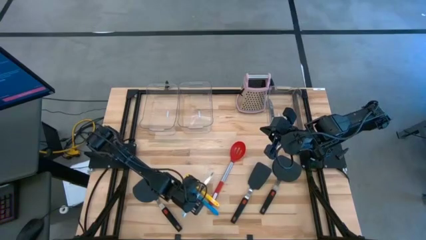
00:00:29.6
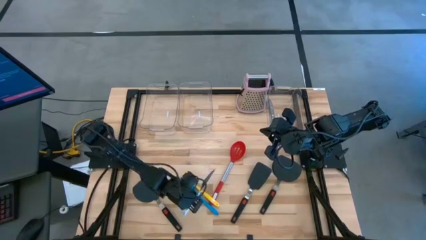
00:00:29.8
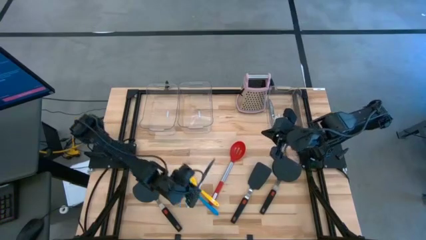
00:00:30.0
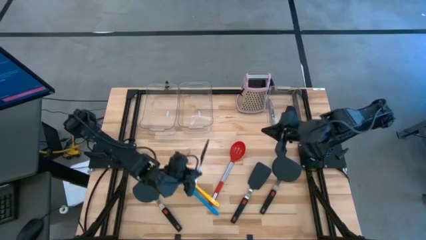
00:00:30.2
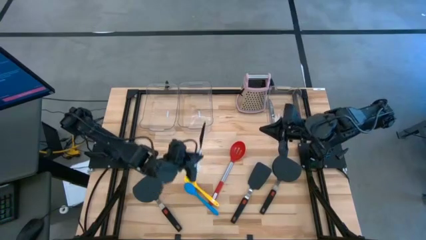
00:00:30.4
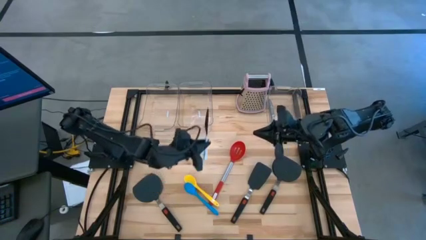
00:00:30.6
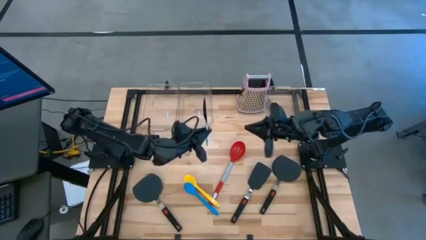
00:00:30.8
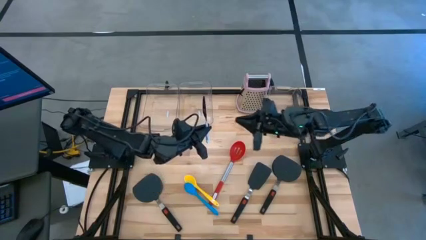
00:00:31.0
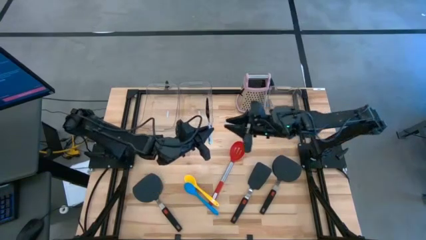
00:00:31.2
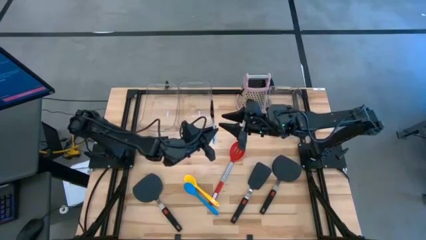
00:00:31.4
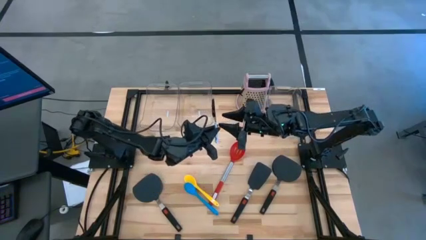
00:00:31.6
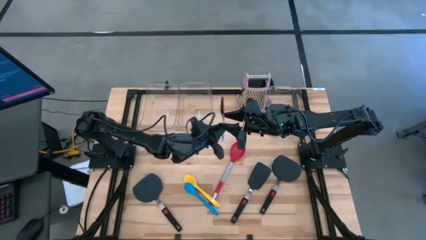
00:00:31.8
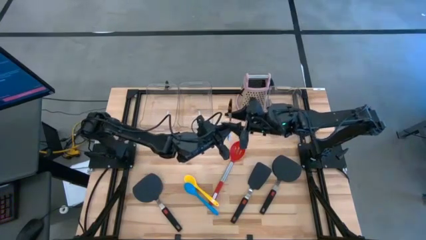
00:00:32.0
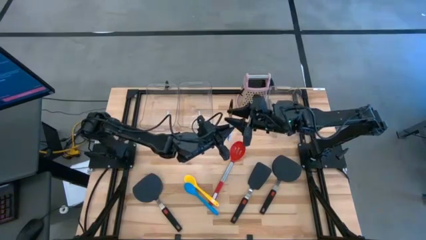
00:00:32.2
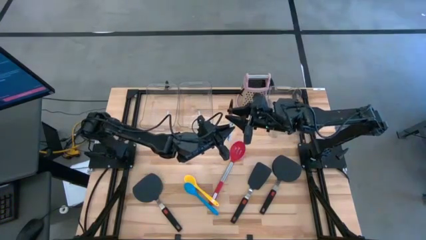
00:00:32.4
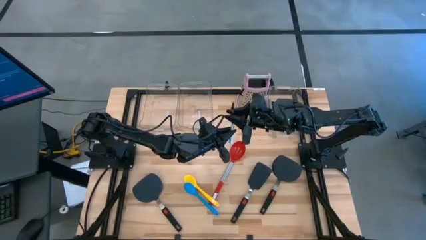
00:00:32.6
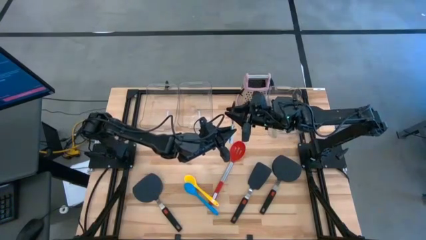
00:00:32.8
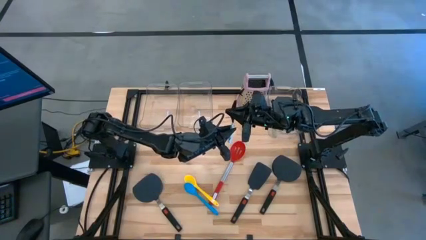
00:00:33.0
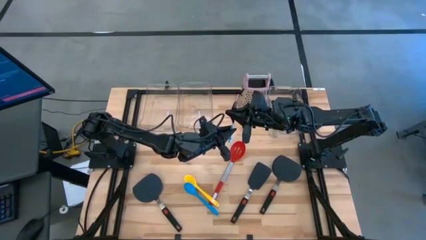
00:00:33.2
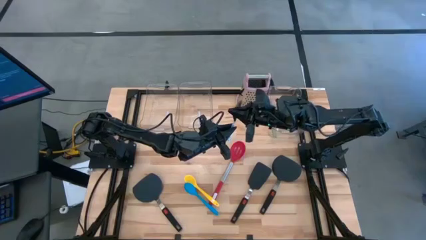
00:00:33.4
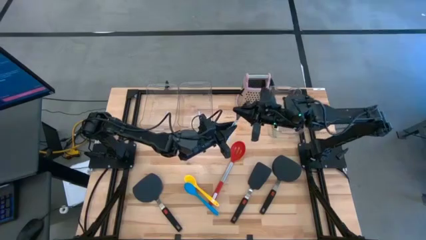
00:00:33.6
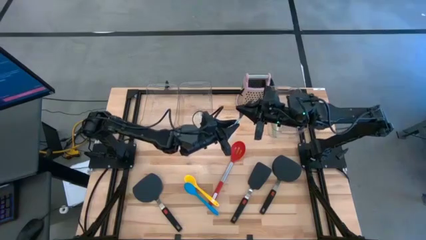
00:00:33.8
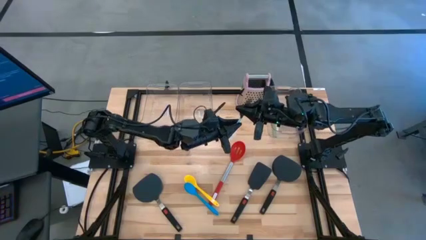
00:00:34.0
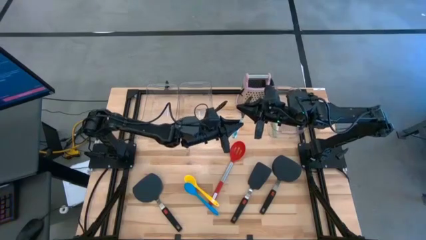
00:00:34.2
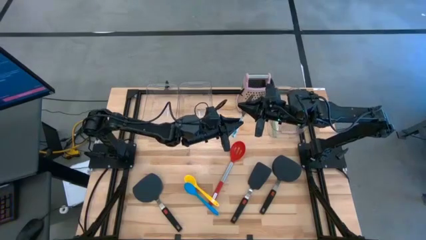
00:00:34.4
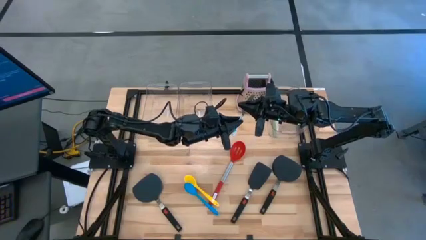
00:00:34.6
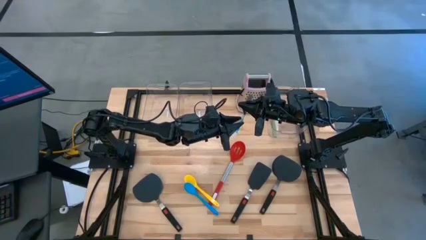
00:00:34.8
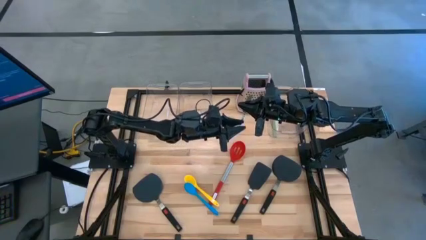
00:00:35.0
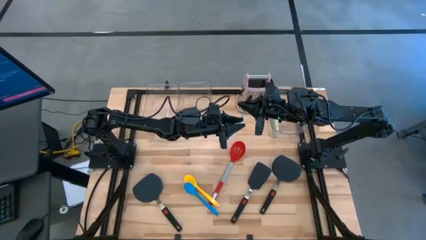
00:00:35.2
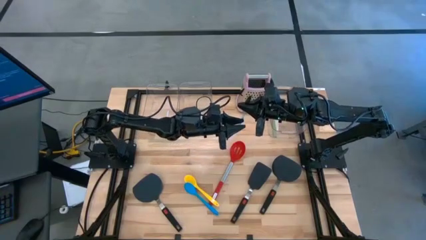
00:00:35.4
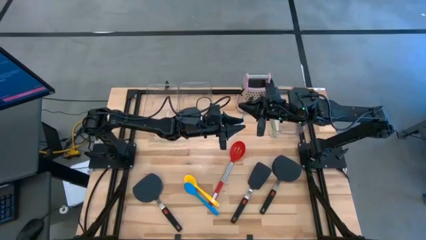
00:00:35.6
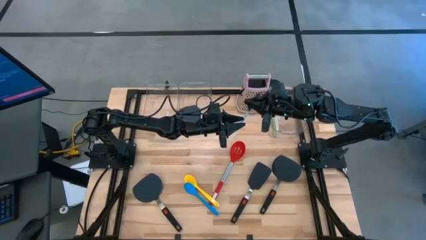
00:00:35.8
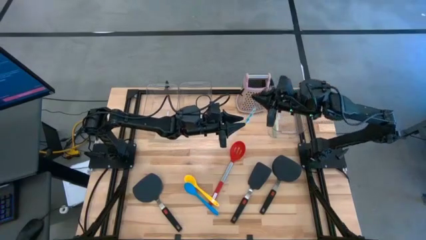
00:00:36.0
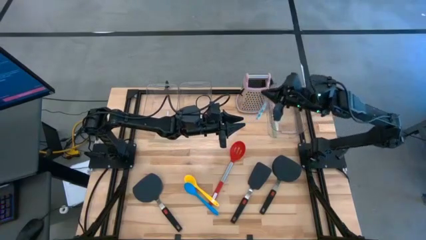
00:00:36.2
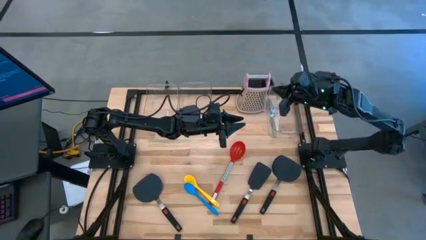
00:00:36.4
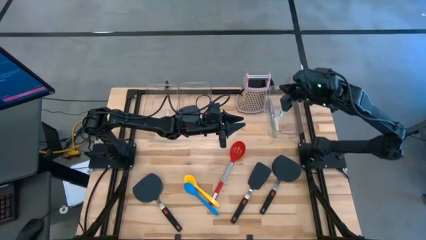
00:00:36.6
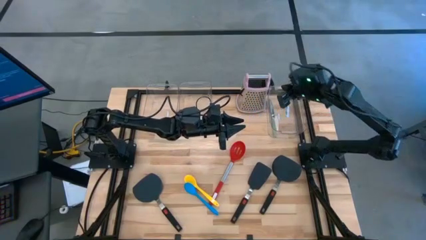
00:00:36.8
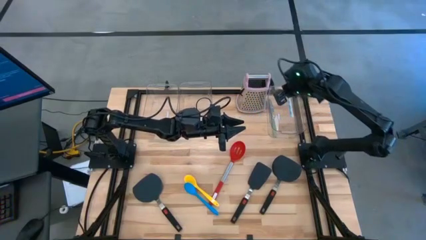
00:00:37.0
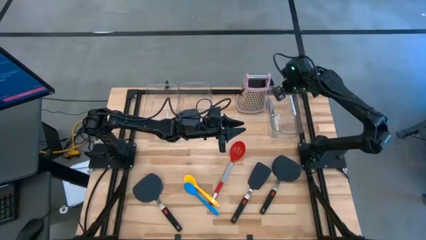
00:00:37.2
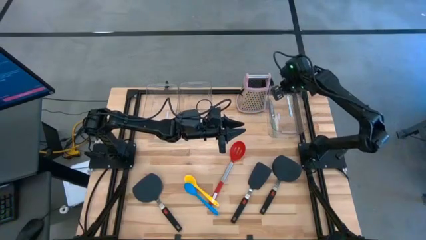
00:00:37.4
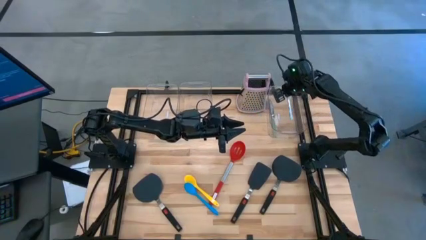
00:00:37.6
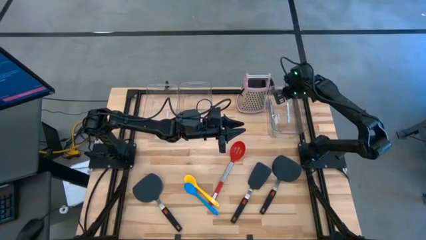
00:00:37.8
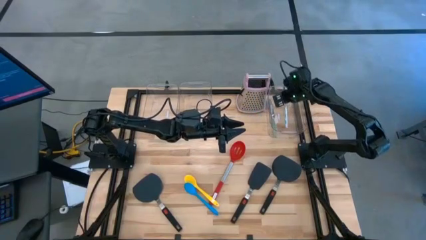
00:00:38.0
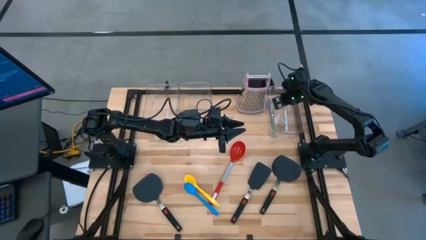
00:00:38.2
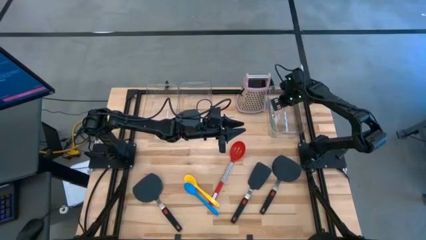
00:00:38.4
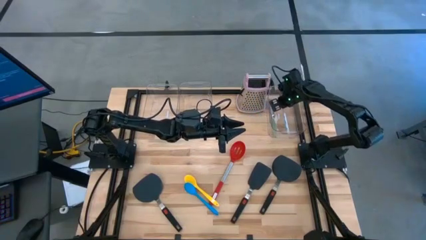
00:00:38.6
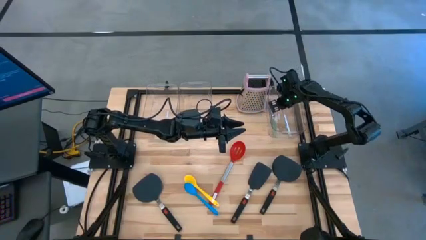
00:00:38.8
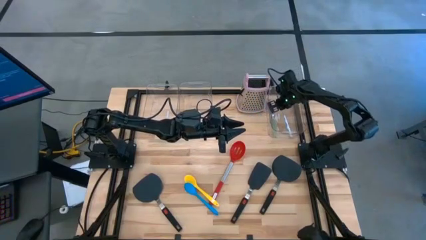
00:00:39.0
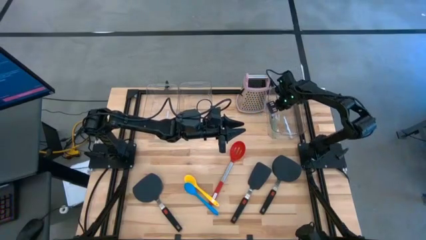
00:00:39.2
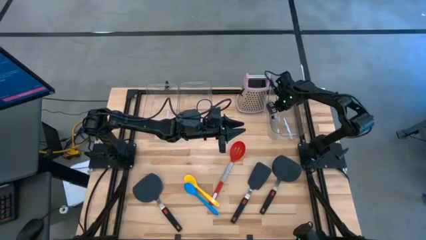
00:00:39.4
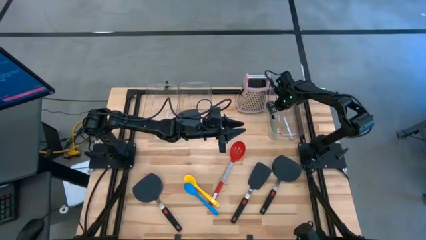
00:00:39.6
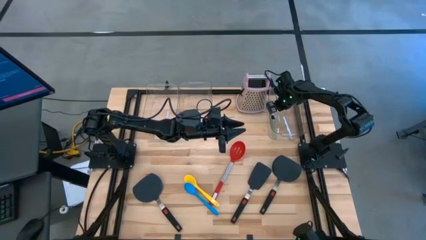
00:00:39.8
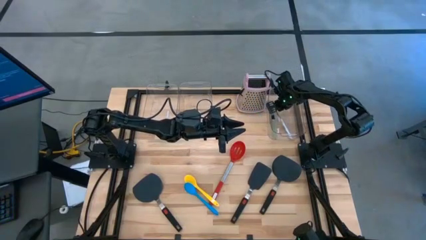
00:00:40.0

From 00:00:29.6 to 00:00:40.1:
Task: Pick & Place Kitchen Items
Put the blue table knife into the right transparent bin

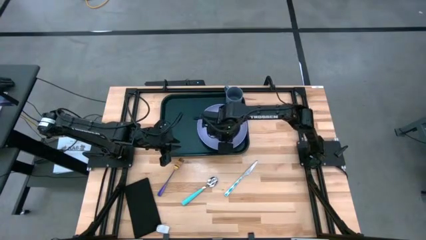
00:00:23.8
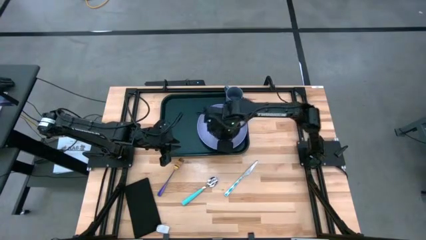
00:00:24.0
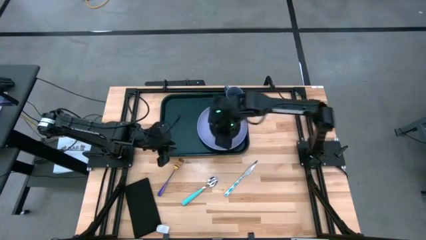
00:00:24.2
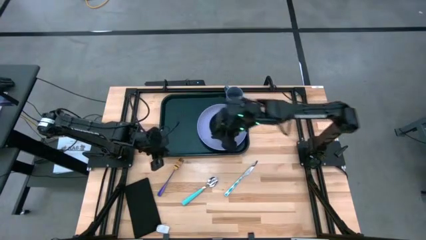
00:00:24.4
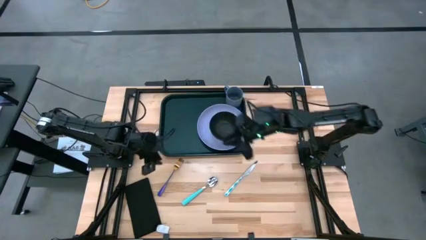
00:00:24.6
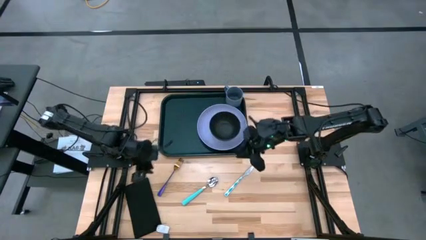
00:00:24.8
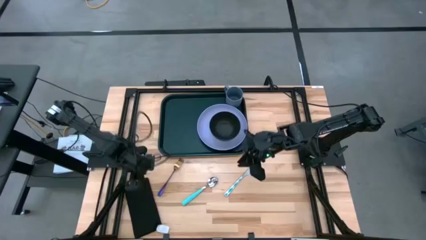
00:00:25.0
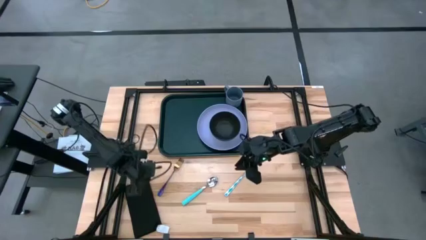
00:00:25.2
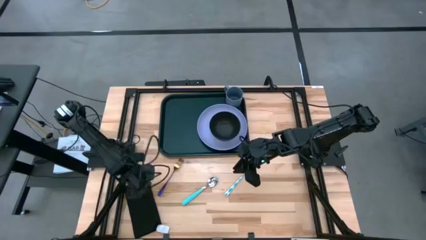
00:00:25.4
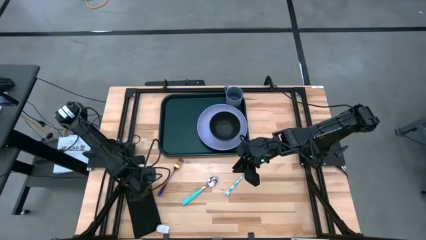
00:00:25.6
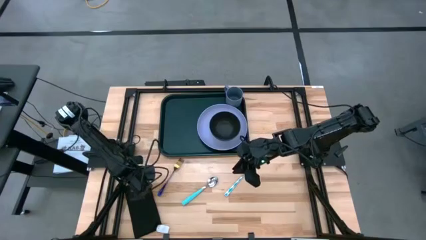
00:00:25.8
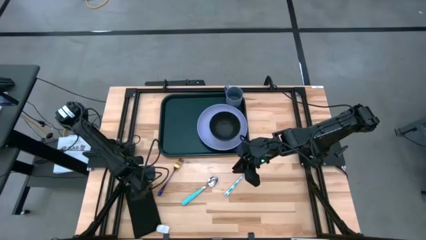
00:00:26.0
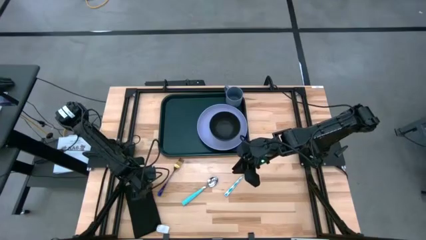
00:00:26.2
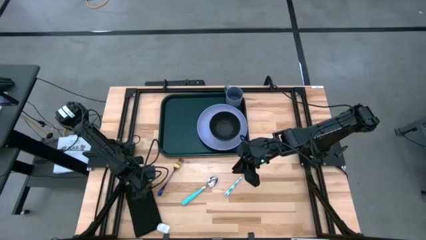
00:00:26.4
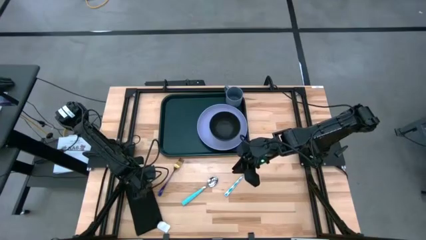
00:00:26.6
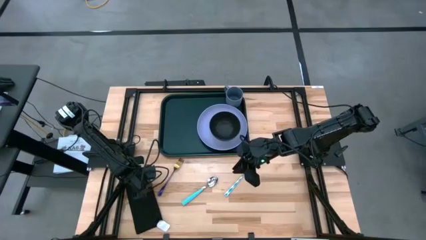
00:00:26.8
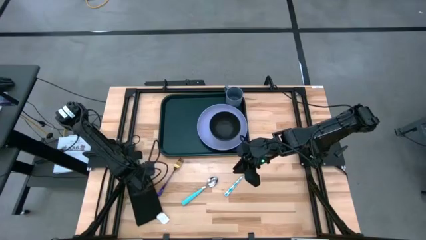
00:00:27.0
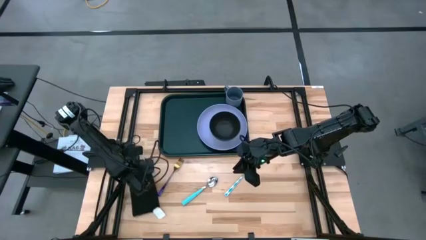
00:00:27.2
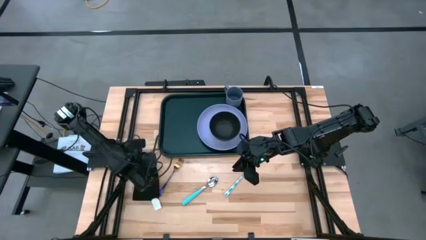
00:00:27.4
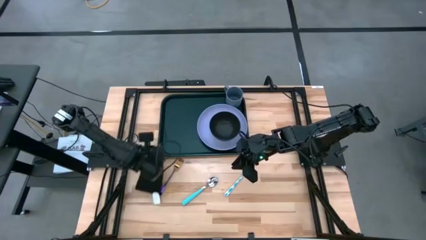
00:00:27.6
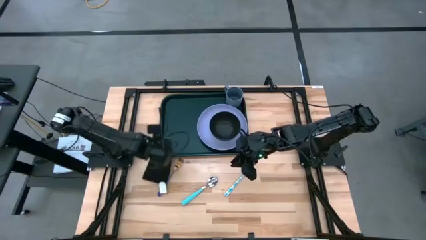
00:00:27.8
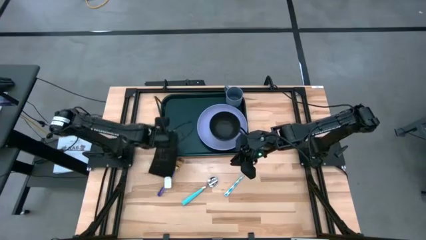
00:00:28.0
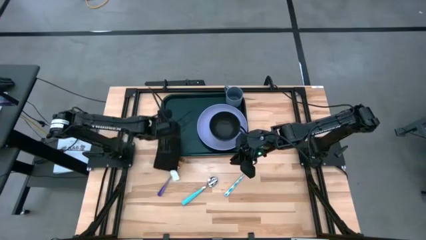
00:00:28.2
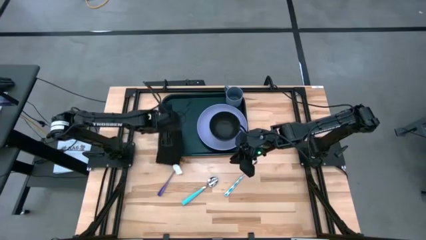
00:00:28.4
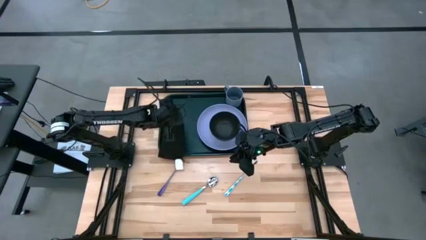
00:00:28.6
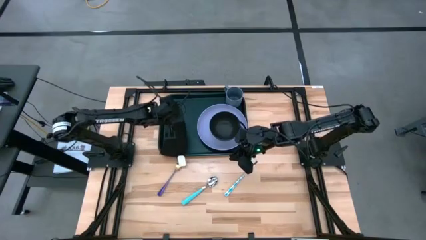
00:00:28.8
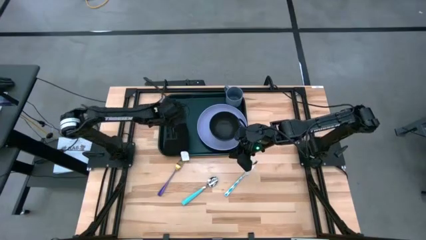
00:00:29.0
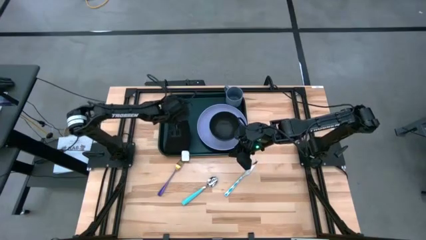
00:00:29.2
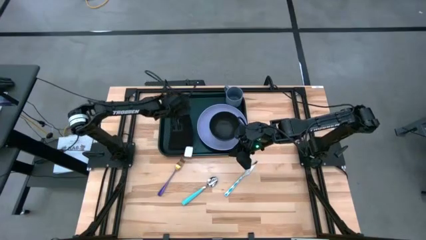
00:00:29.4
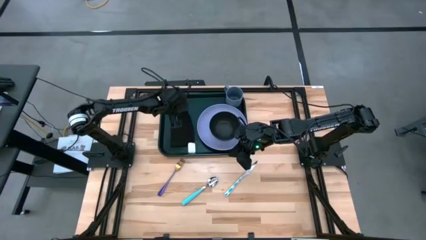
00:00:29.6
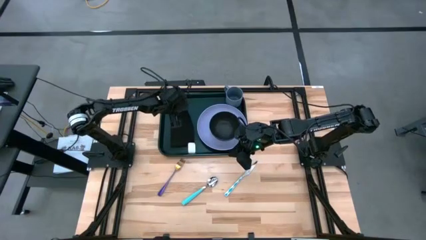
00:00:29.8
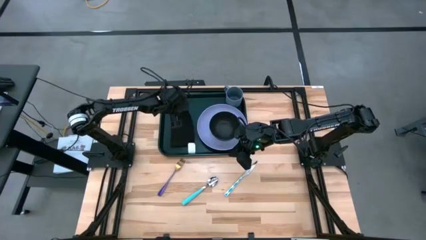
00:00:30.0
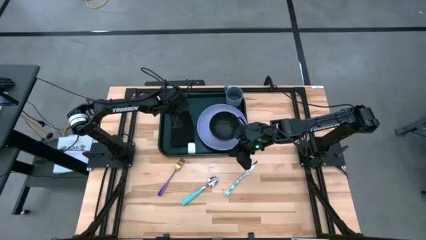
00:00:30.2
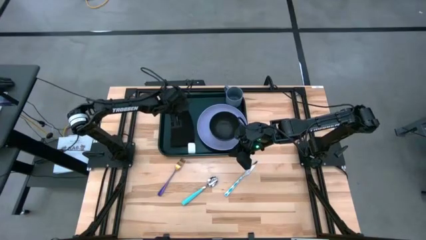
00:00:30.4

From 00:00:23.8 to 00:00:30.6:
Task: Set up tray
Put the napkin on the serving tray
